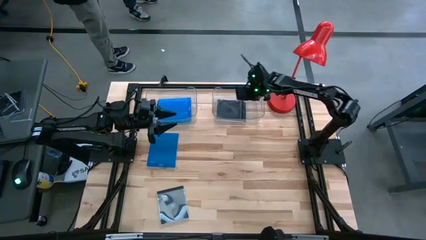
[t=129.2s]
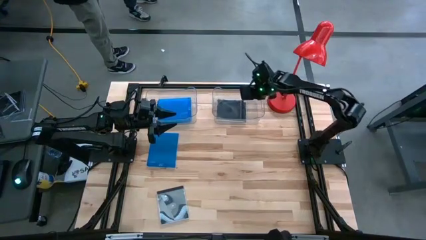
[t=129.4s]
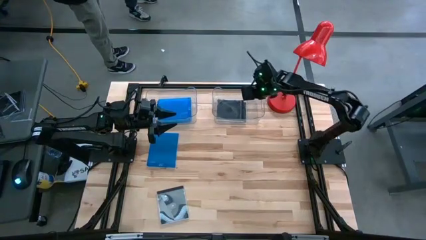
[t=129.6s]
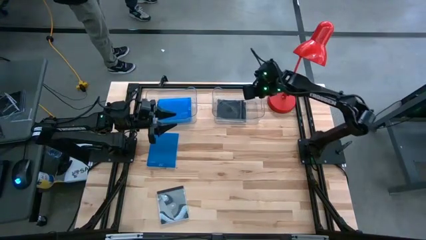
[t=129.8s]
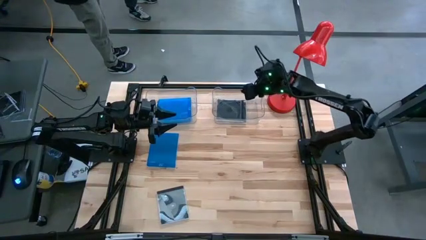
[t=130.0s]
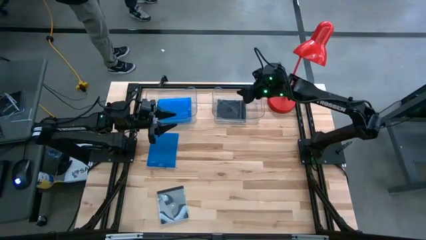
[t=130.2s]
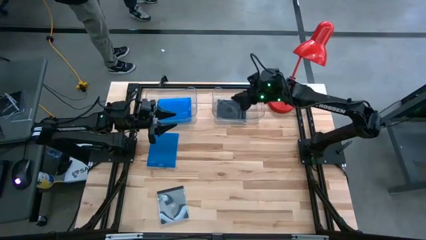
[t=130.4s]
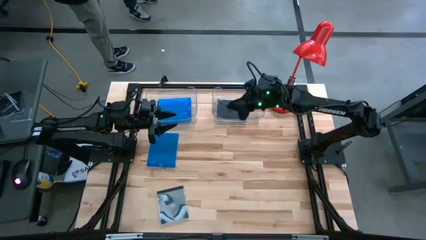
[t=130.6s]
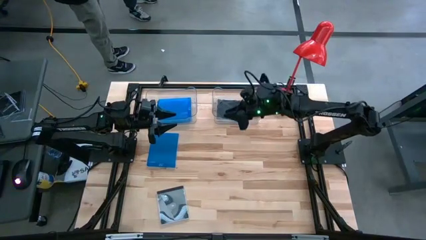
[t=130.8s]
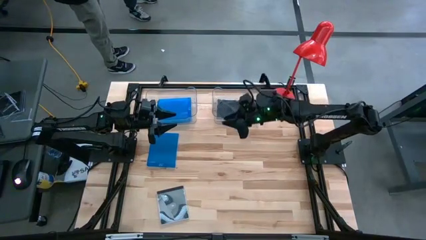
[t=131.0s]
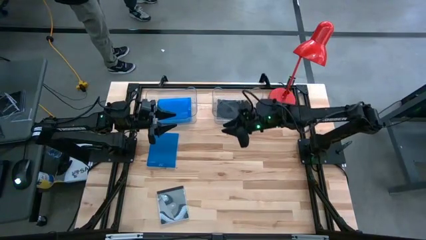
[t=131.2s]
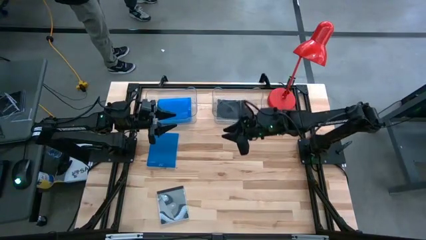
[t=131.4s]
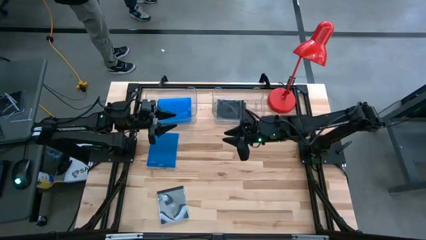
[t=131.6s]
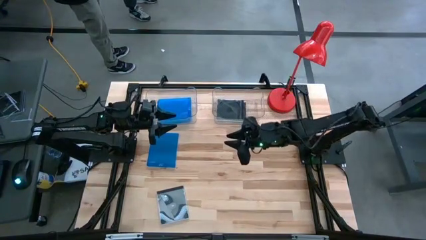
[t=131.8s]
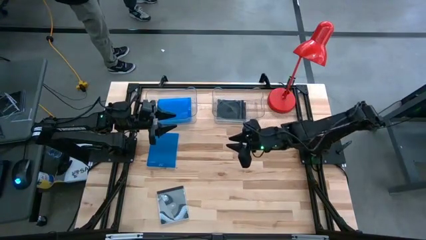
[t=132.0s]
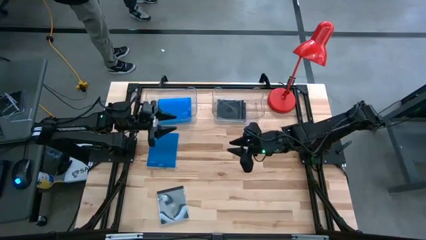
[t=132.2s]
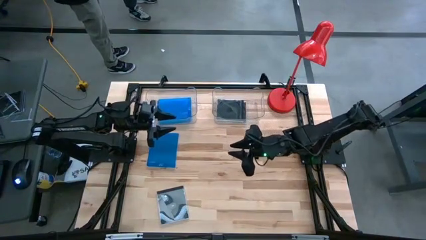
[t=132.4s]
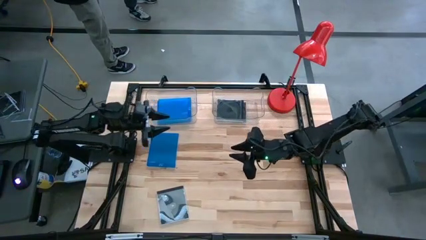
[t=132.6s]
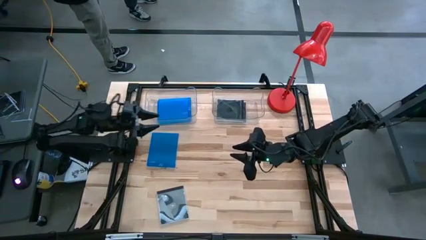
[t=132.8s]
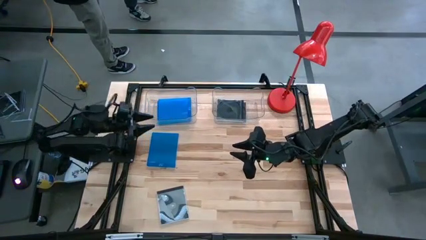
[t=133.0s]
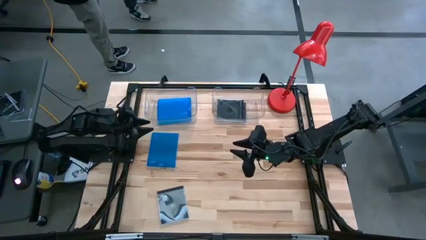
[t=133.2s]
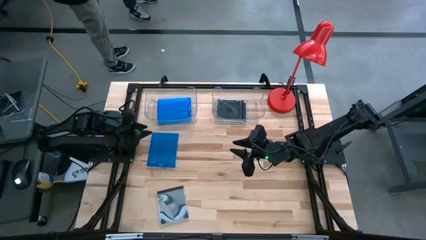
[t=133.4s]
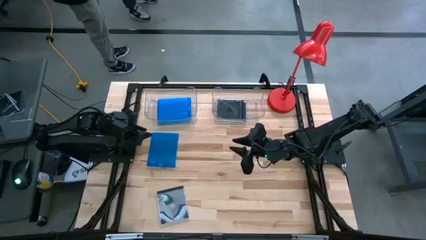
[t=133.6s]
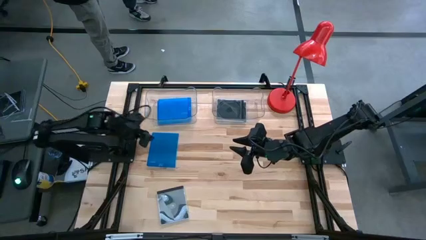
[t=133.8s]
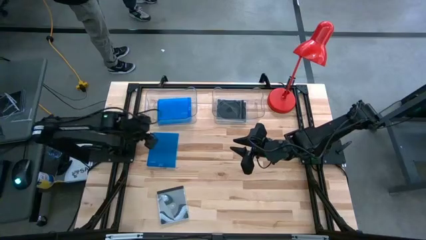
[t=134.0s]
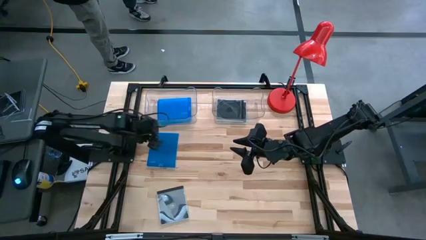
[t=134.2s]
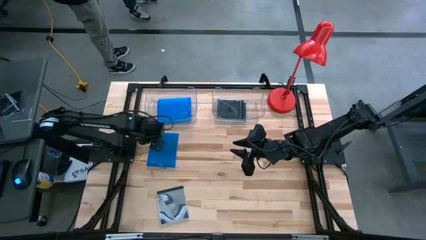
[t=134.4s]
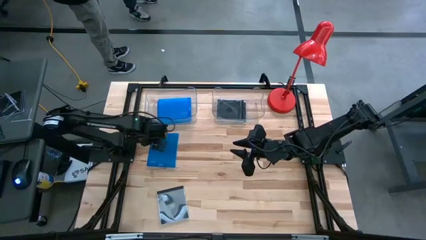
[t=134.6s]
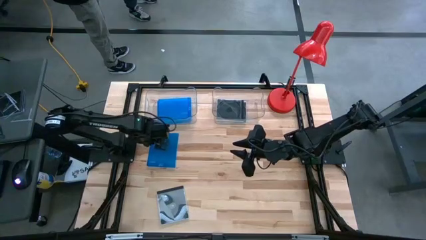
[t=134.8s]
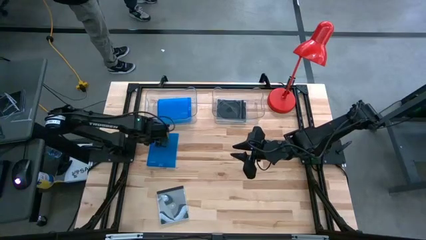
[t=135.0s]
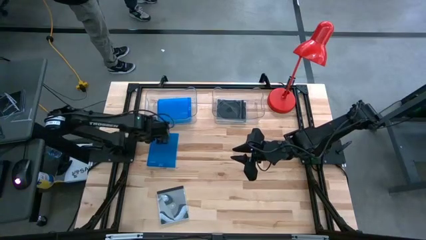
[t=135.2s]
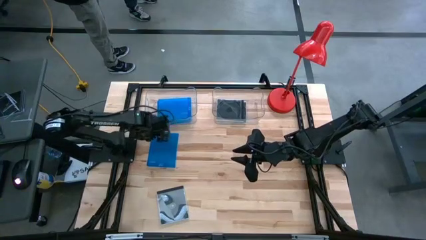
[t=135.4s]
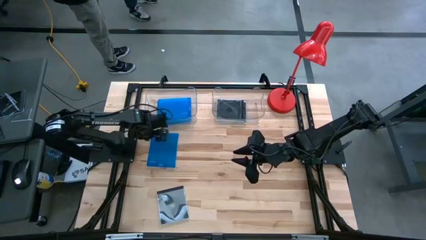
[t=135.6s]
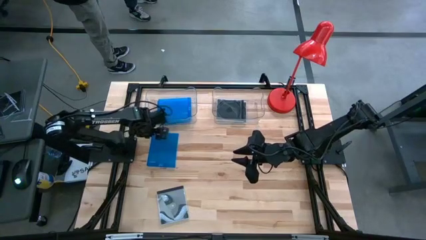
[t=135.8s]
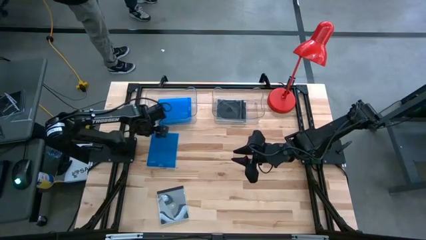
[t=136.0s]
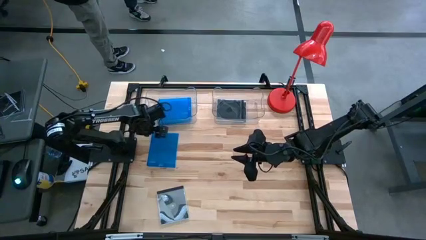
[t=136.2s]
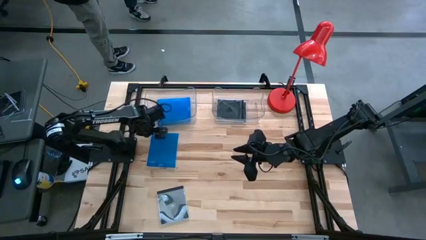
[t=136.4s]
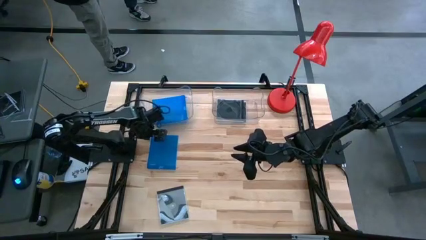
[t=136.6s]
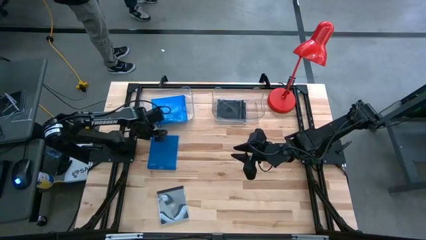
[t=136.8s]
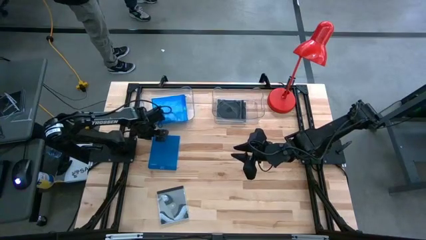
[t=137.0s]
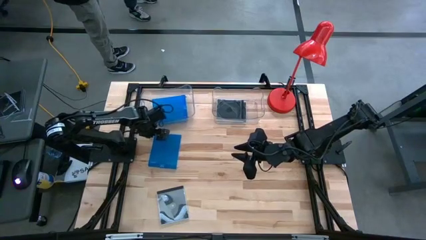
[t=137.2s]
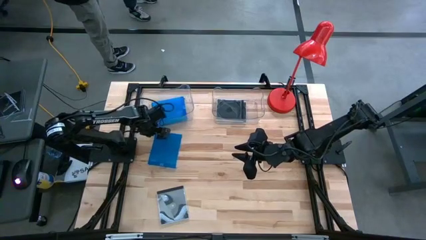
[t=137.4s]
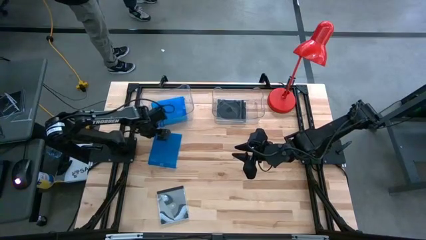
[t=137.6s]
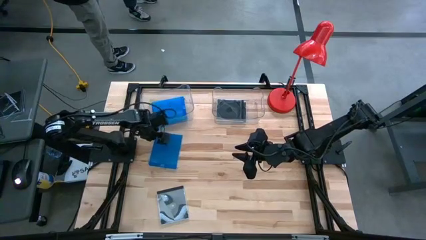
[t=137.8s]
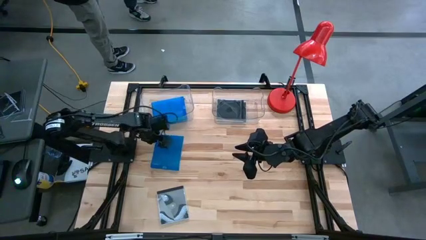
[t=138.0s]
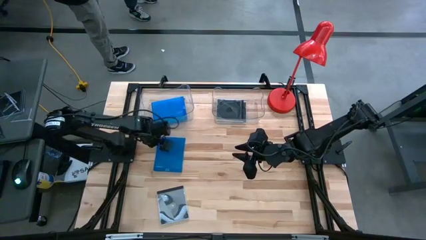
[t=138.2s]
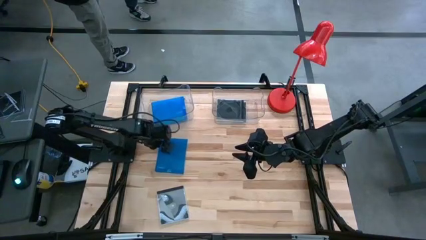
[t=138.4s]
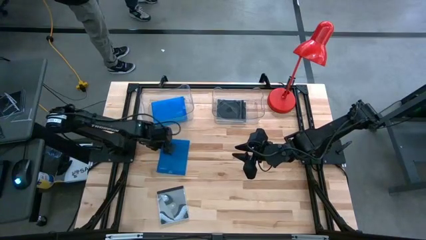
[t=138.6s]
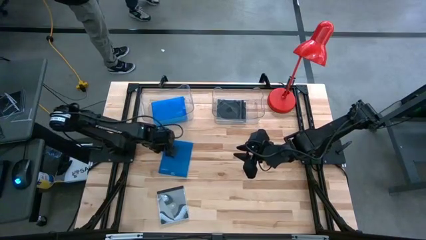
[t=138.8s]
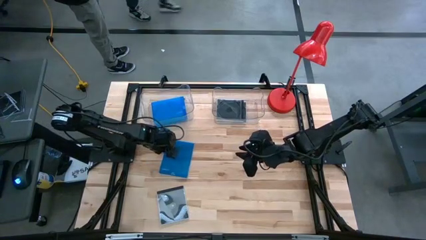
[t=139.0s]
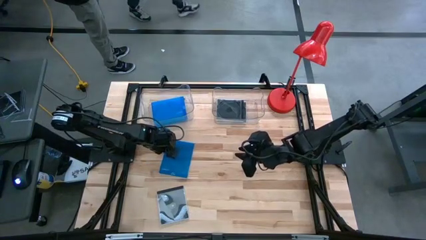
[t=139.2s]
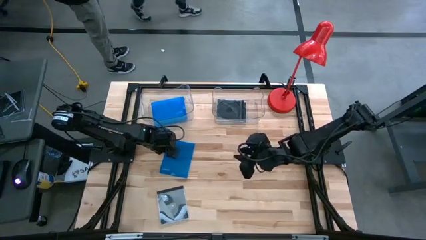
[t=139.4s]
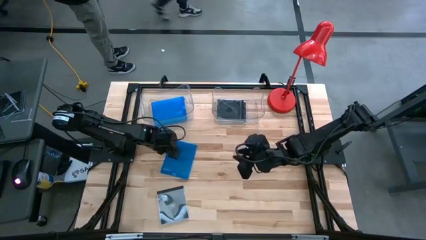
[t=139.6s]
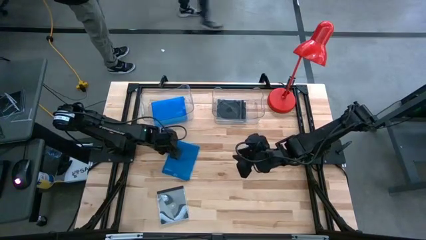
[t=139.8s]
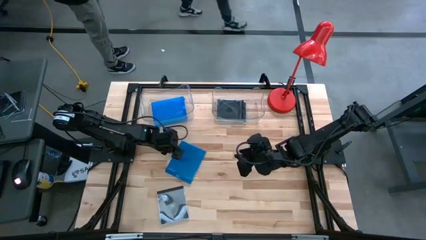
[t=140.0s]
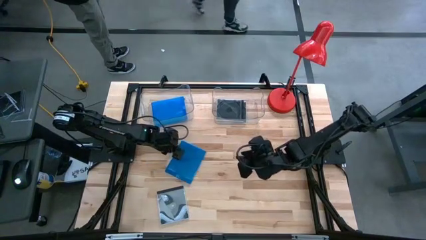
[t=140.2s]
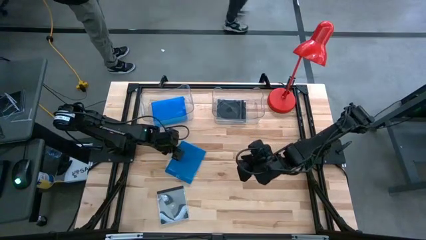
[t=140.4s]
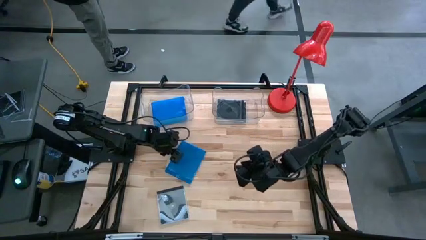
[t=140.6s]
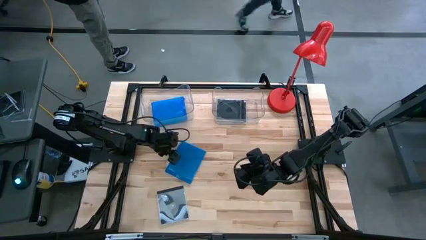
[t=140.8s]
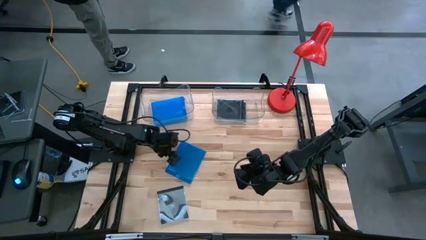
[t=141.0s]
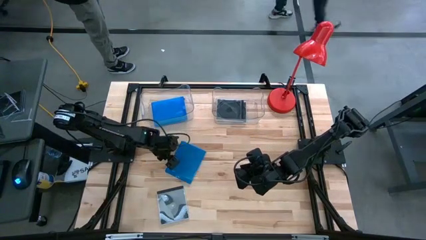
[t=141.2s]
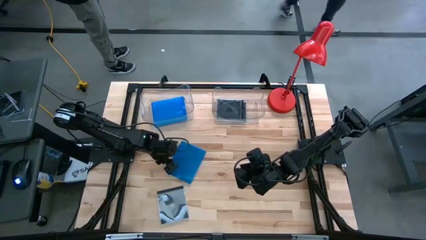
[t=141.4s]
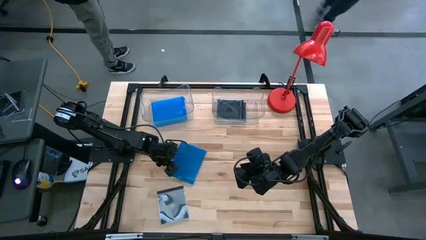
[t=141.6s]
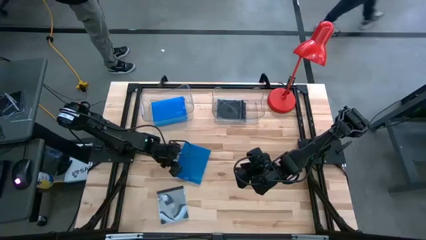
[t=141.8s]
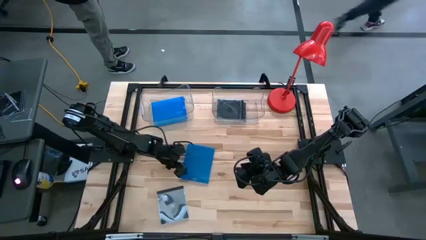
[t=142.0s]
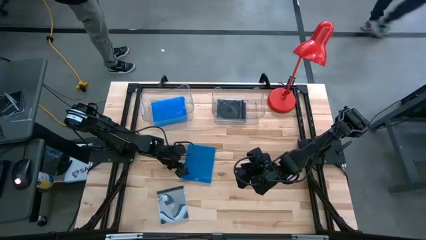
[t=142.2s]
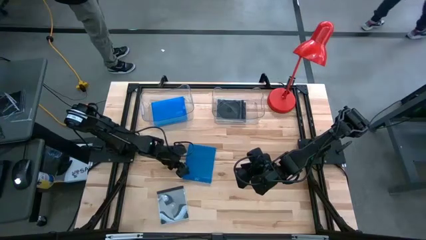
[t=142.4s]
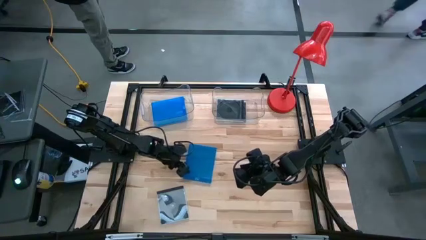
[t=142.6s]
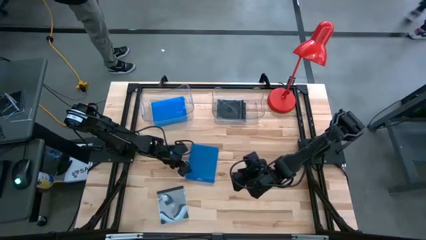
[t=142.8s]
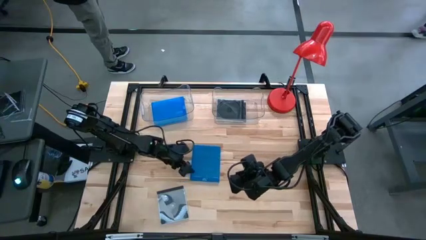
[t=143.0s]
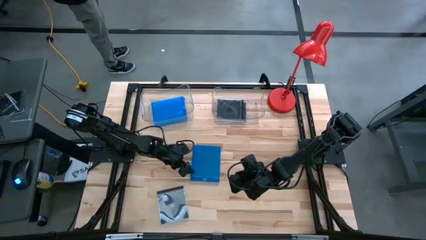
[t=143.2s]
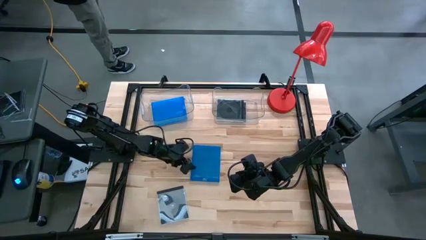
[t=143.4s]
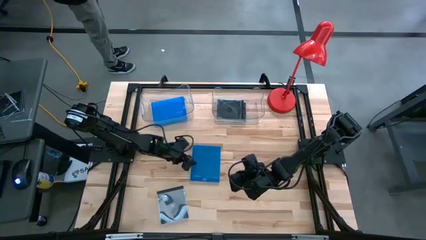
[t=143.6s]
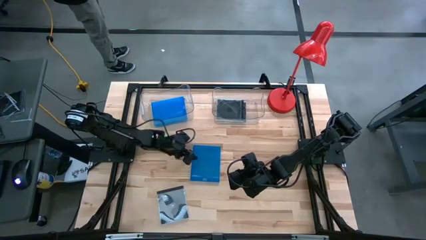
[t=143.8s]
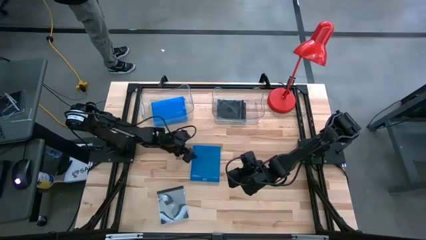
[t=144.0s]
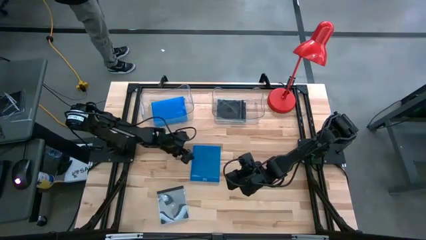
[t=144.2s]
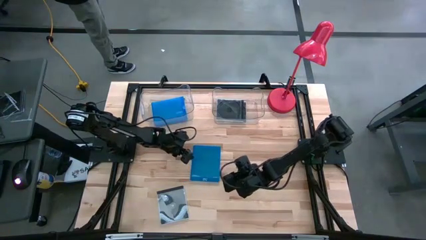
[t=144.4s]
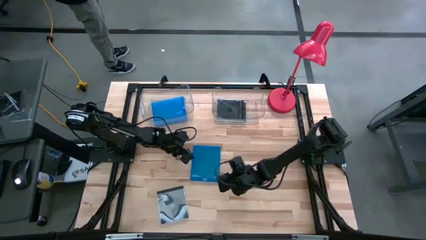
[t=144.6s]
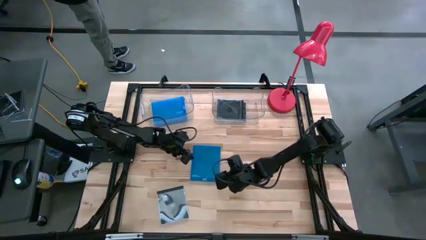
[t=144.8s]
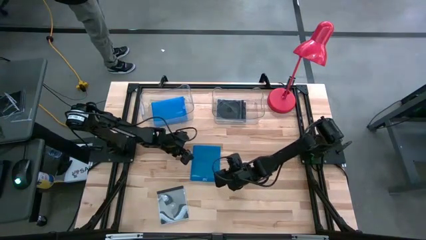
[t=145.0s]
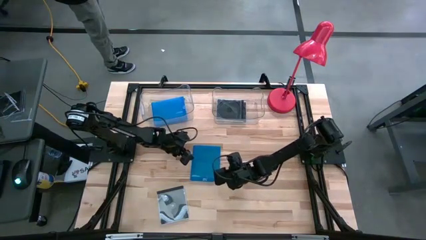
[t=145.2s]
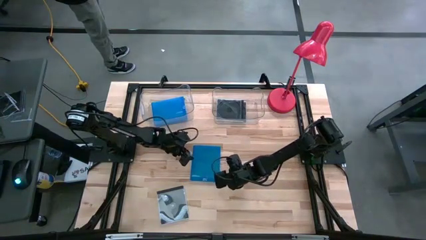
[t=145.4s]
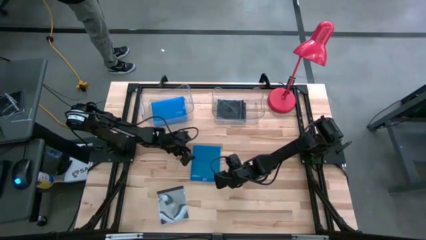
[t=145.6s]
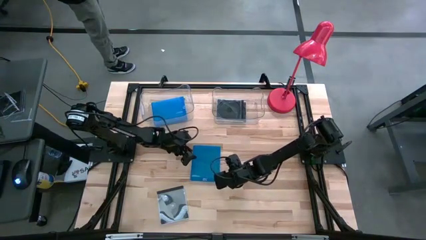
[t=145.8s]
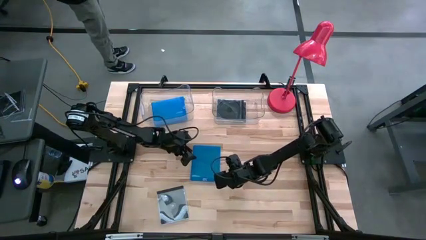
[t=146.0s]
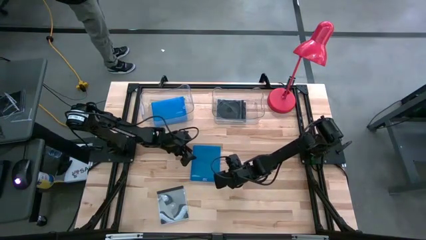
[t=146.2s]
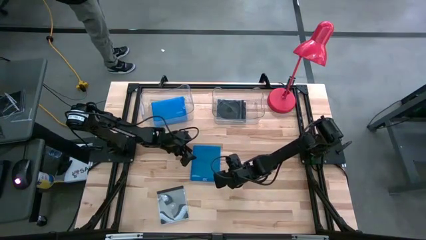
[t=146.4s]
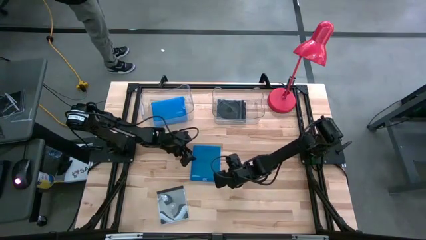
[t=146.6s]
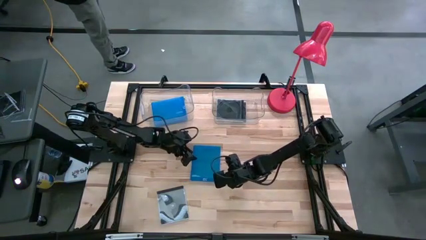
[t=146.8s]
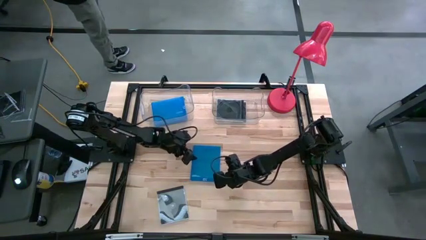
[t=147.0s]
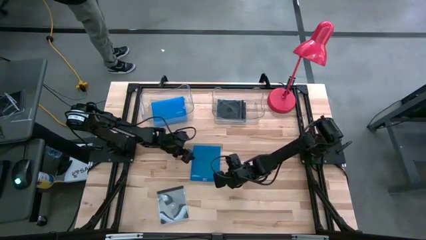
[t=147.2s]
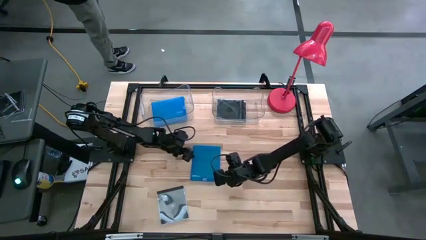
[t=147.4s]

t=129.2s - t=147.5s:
Task: Pick & place jewel cases by type
Put the blue CD case into the left transparent bin
